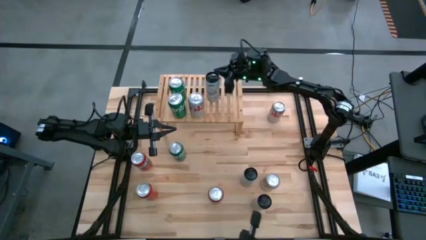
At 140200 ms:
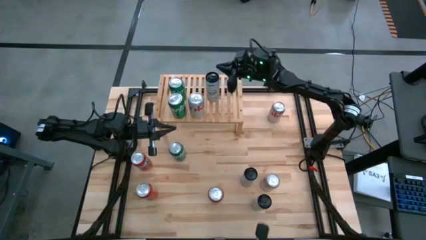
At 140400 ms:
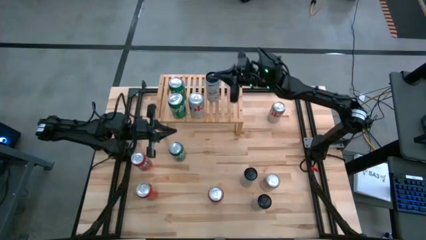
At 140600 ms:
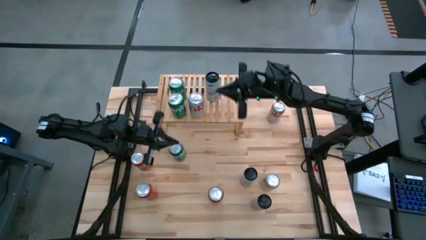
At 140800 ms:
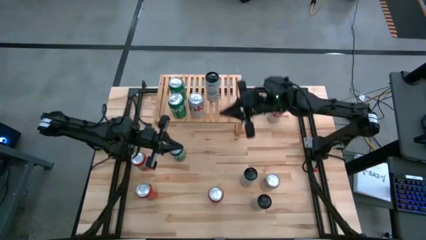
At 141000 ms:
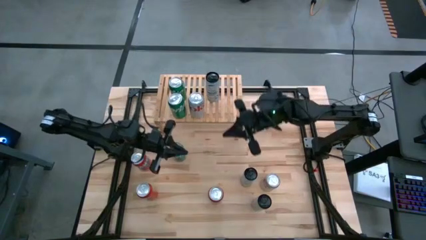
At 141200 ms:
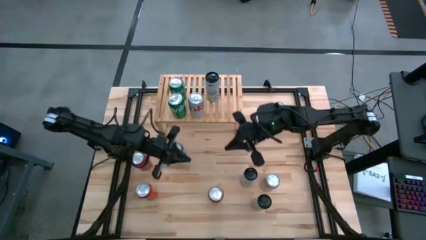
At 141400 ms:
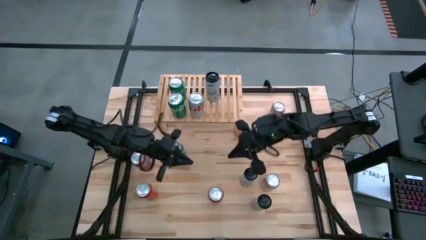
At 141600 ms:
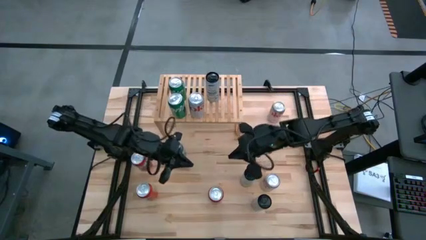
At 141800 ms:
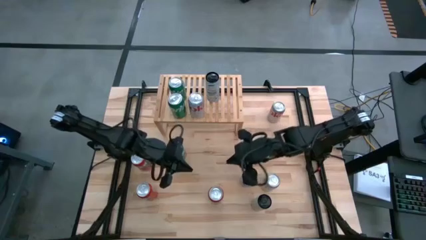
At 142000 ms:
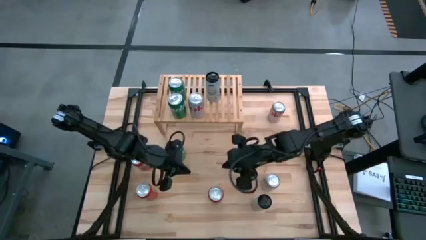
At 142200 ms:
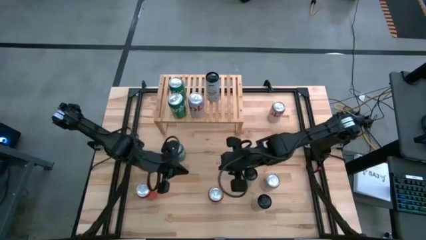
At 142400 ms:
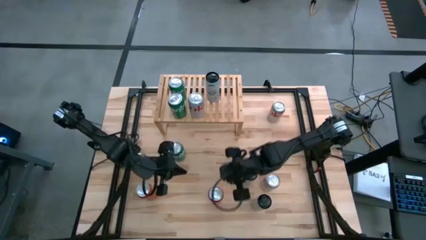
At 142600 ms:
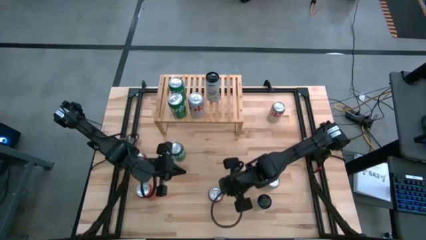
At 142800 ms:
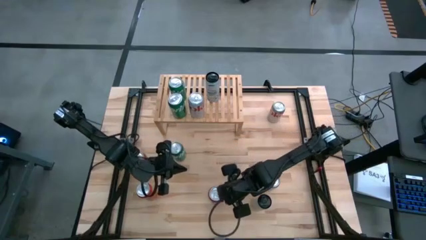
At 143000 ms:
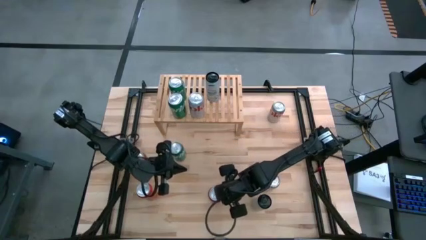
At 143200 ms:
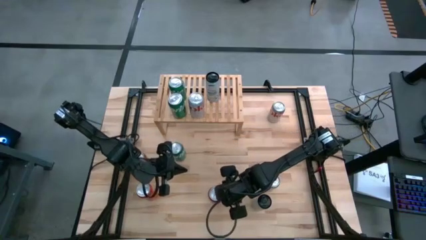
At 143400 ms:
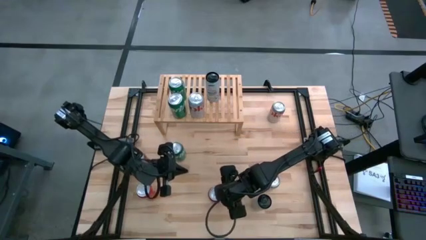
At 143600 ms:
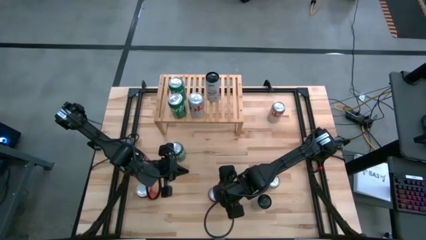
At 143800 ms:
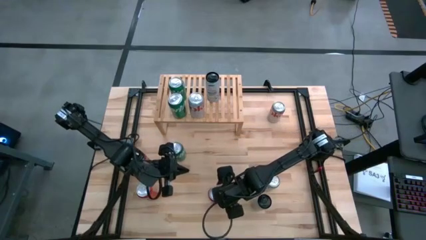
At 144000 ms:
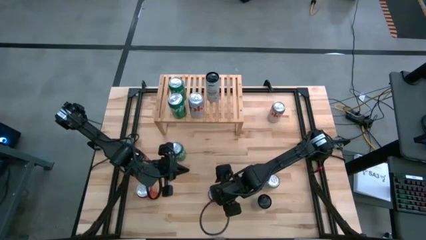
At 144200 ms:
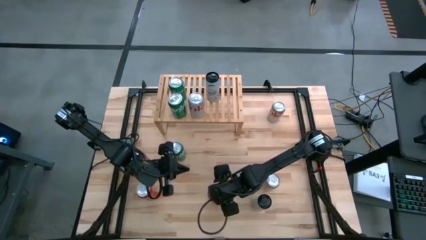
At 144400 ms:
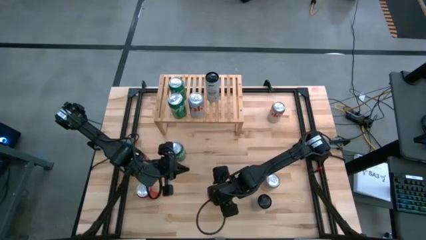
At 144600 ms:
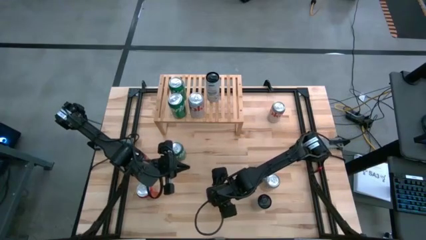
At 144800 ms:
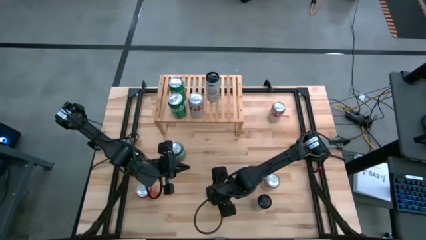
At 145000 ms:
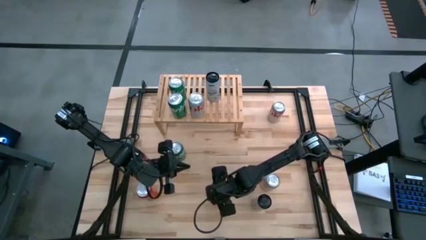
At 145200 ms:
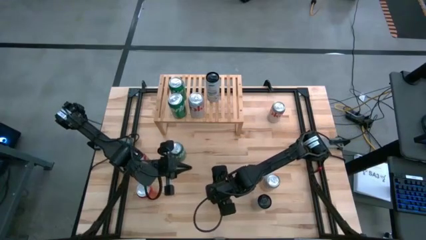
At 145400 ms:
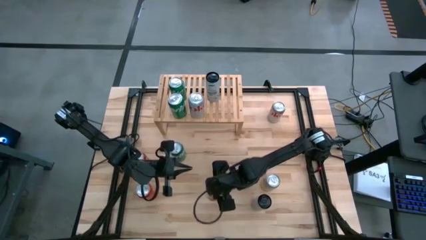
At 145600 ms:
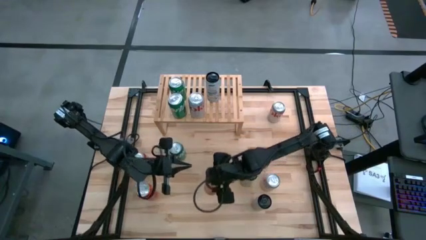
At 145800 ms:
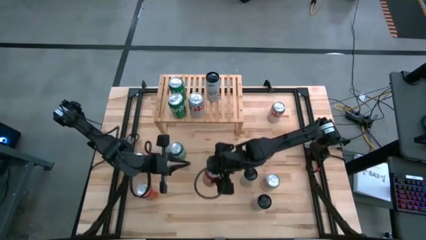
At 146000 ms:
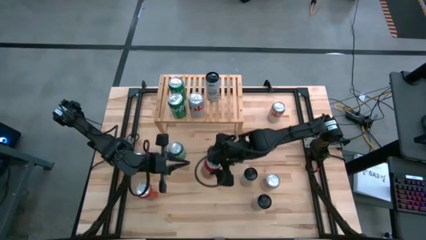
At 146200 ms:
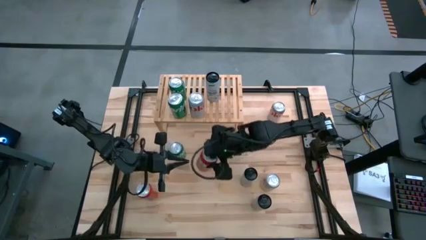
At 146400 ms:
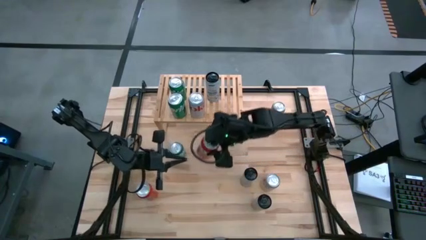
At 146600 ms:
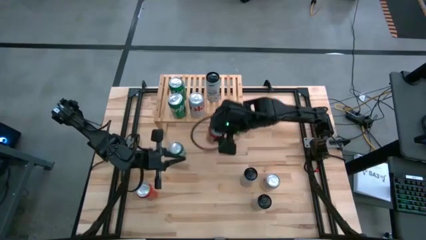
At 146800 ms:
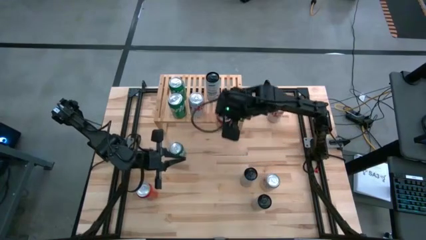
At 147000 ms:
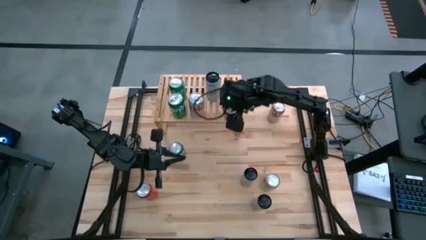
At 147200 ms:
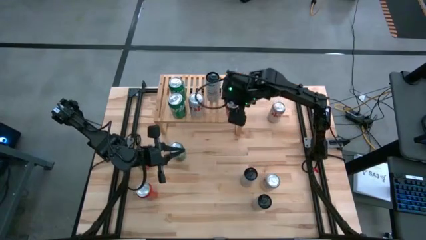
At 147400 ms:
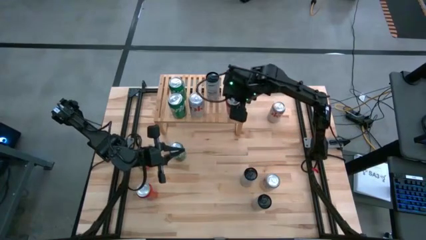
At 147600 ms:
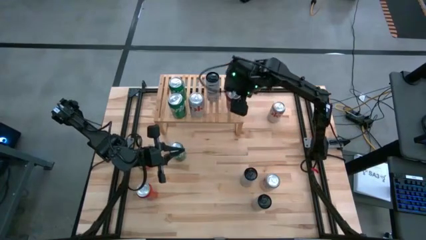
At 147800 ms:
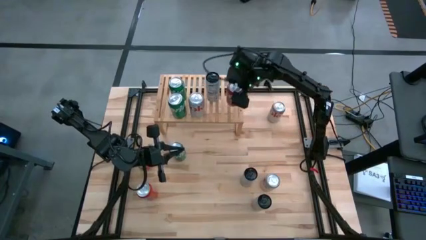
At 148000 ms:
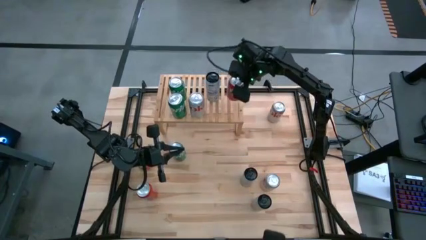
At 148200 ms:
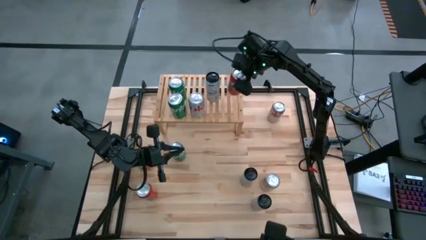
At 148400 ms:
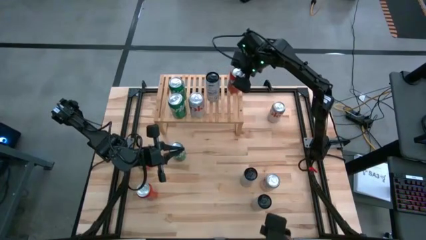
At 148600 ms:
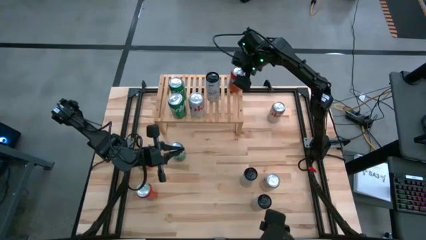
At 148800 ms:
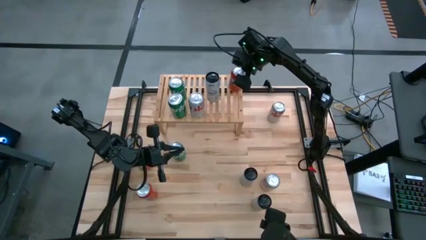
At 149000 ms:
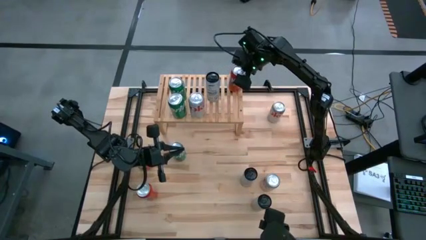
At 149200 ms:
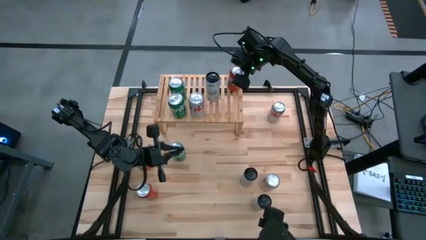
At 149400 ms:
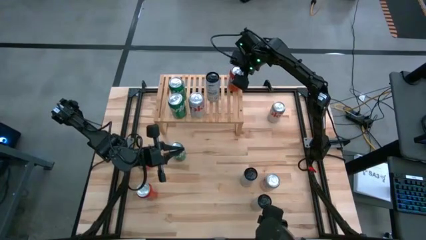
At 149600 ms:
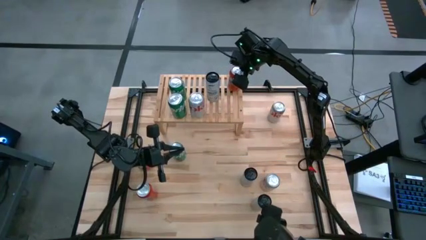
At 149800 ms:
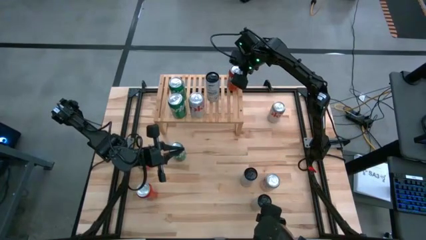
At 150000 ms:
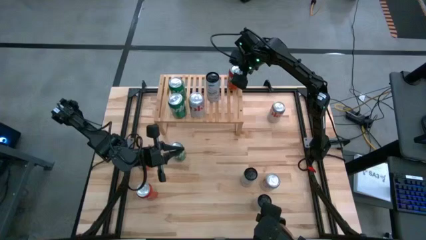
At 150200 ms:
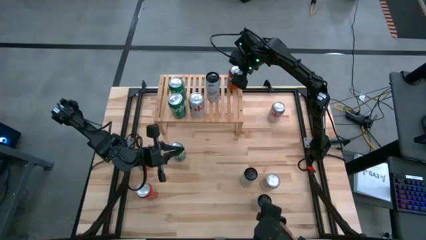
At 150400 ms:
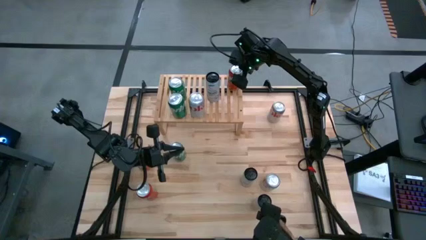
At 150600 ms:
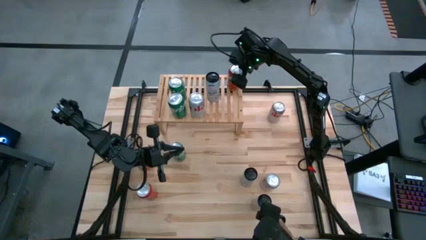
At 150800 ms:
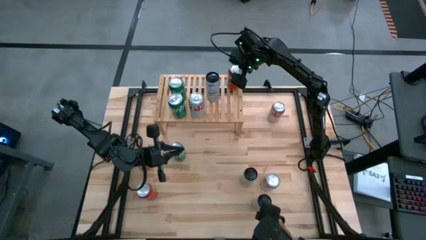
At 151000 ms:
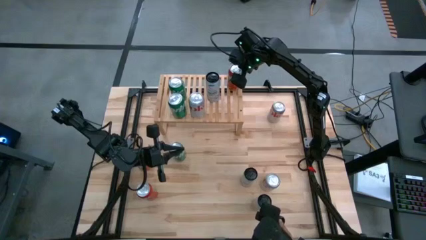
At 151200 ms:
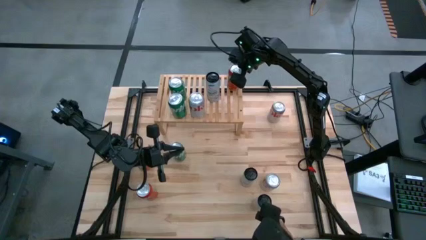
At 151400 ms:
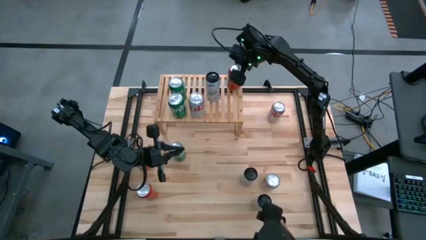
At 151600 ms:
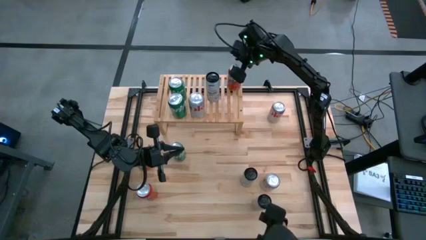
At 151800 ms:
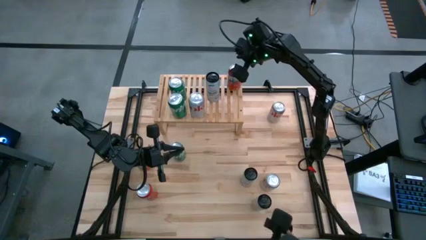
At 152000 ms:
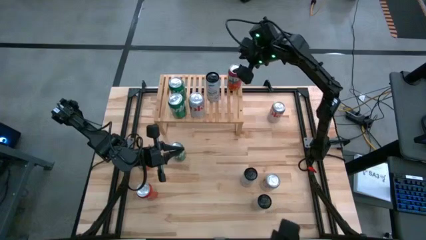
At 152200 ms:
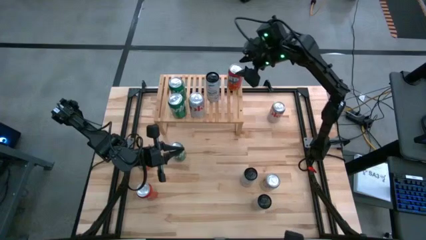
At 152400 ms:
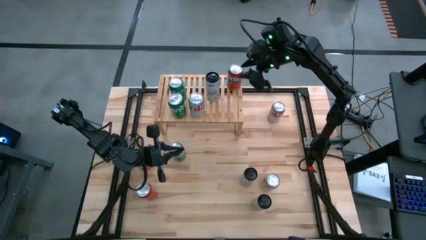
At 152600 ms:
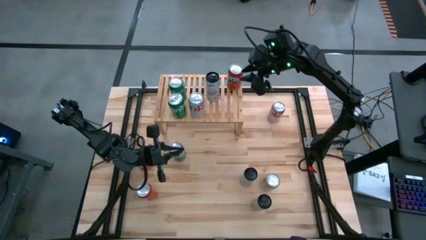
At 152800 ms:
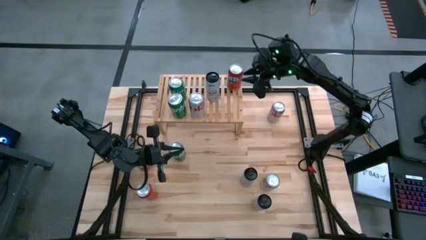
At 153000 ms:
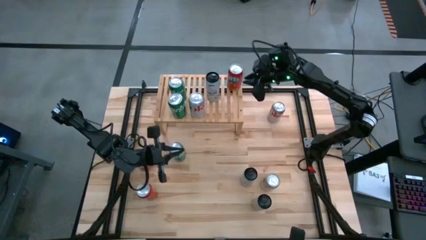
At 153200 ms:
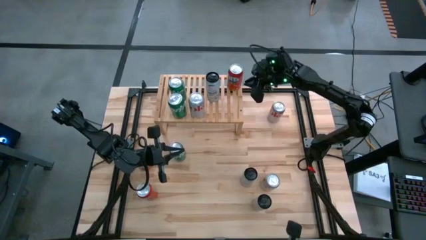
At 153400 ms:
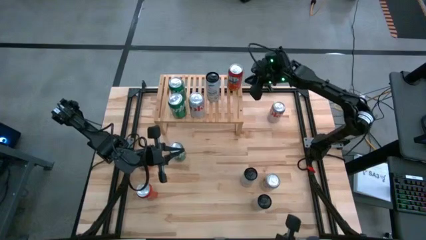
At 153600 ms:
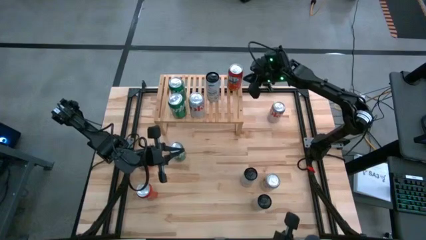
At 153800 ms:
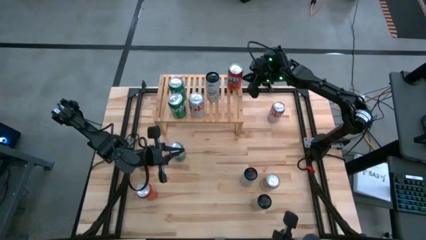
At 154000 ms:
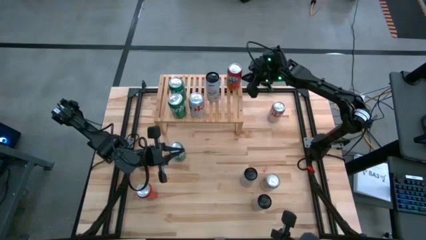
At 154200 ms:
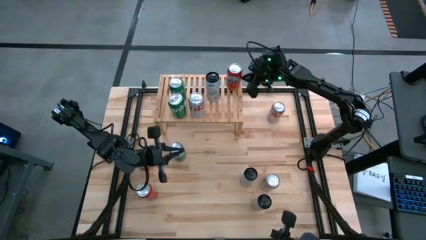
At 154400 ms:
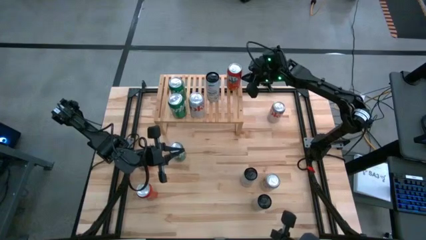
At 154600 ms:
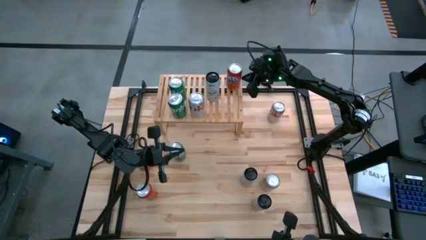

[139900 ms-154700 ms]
Task: Place canned beverage on shelf
Put the right orange soda can on the shelf

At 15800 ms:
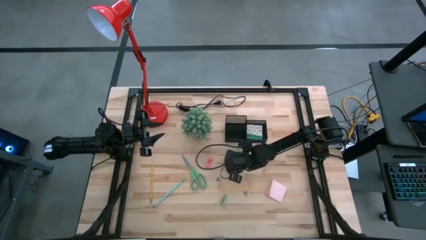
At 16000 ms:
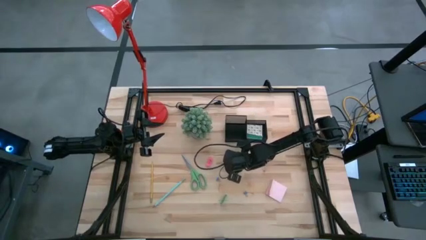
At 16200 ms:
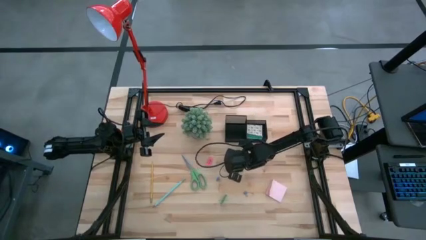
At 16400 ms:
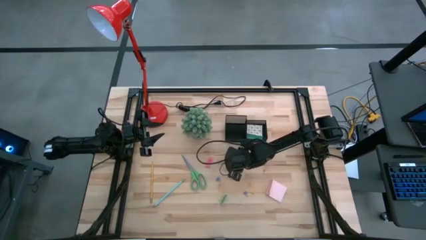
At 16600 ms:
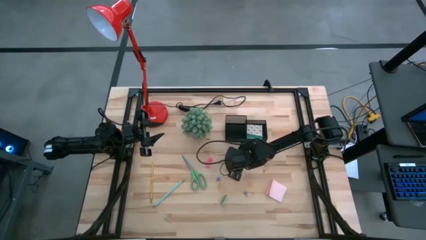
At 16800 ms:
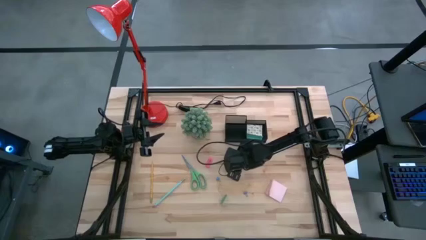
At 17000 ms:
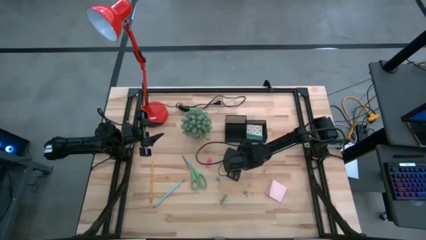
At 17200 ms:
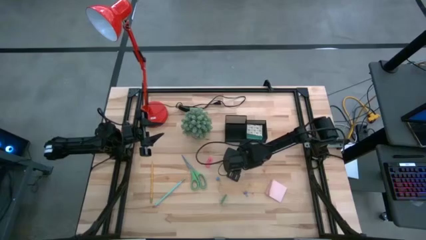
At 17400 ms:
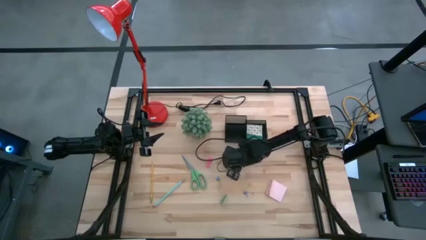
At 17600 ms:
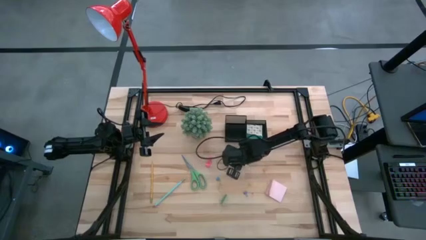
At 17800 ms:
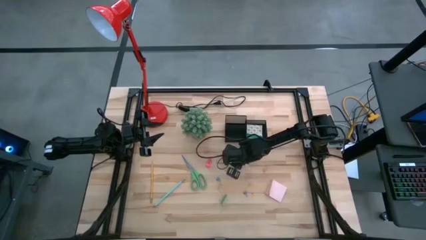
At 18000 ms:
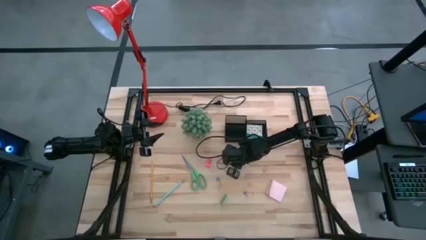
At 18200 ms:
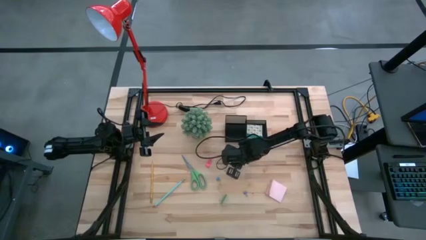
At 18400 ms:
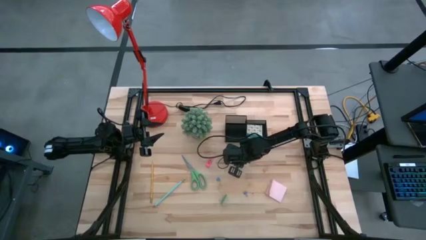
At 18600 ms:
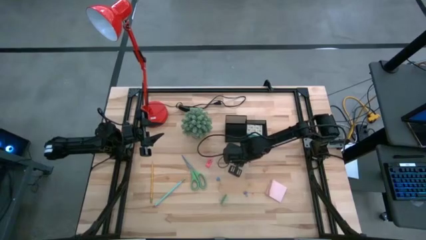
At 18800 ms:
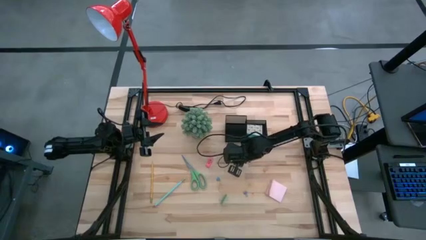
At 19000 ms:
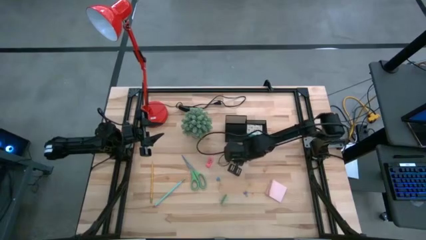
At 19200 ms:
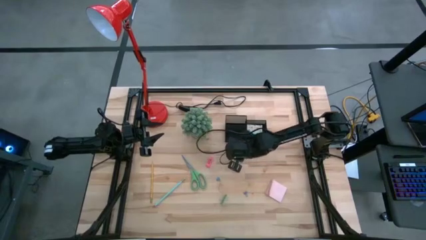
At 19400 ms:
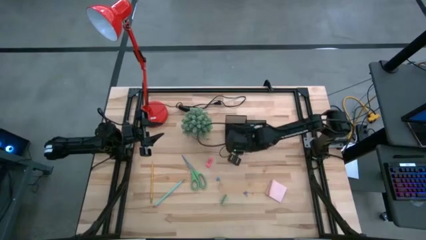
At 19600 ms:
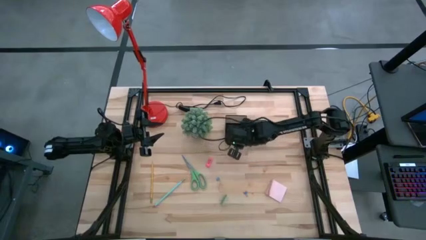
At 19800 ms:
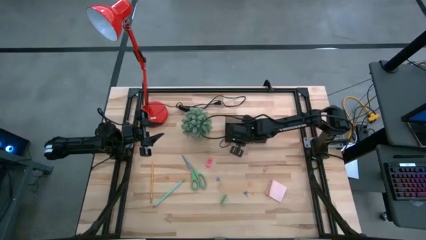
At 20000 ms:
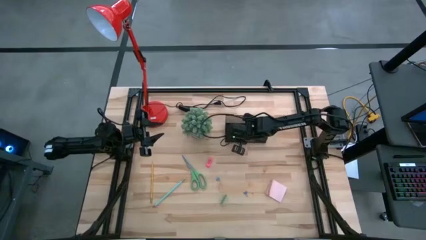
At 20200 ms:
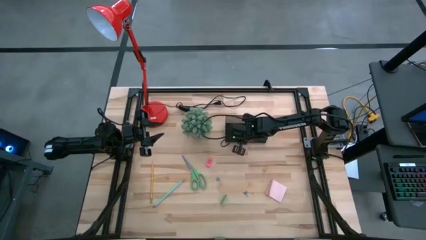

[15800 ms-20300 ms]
Task: Pick and place office supplies into organizer
Put the blue eraser into the black desk organizer
